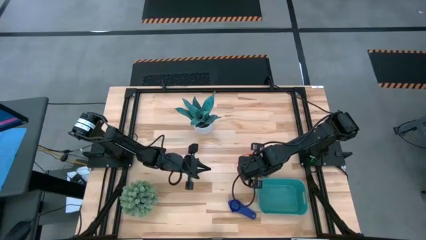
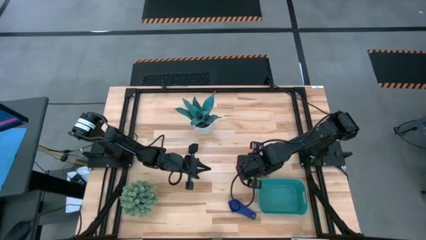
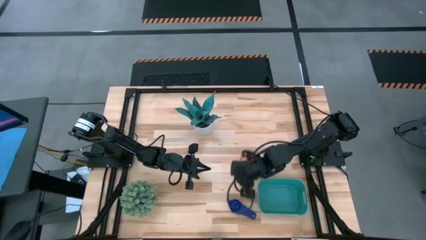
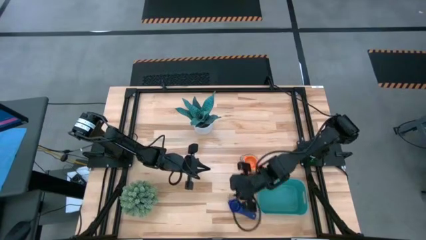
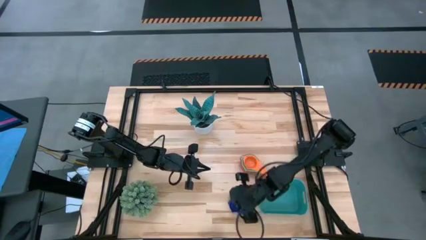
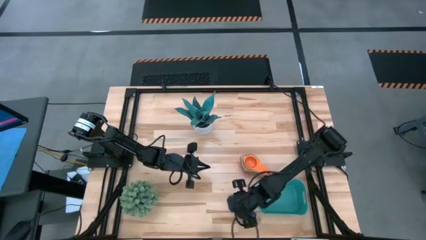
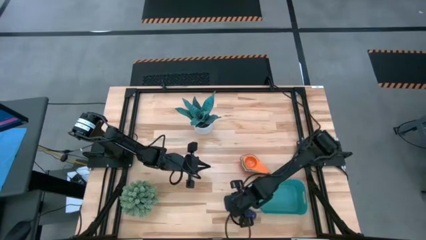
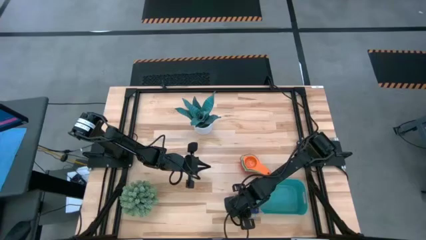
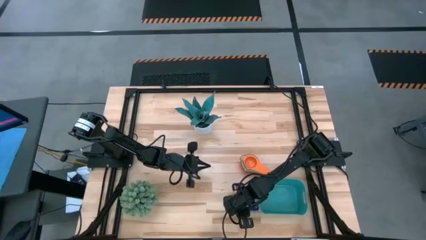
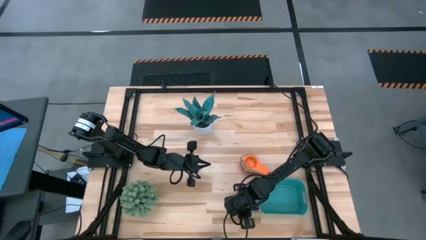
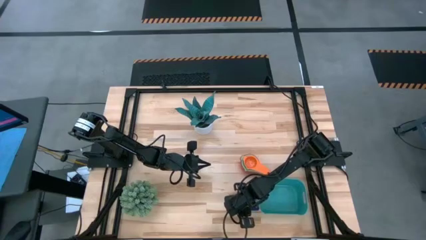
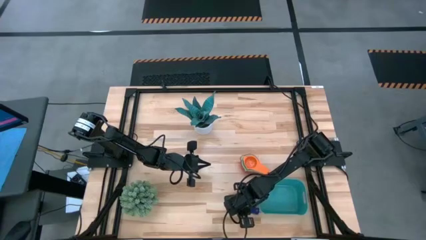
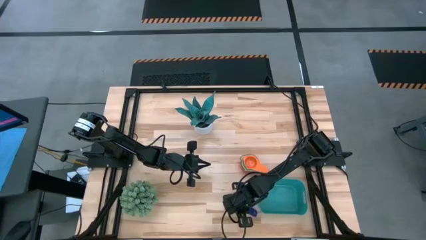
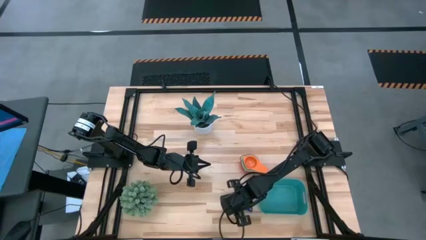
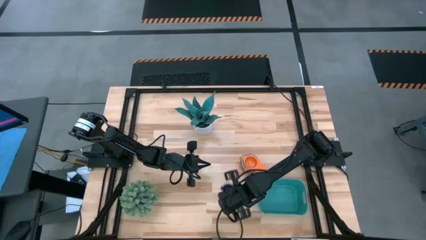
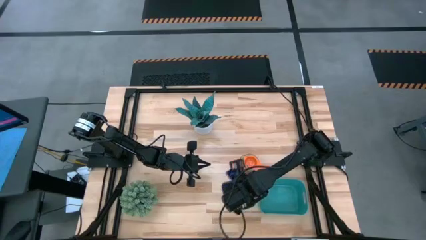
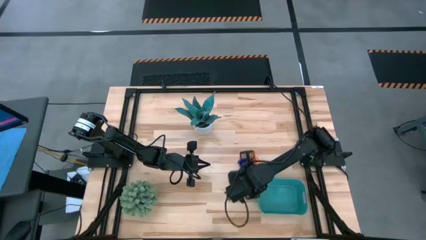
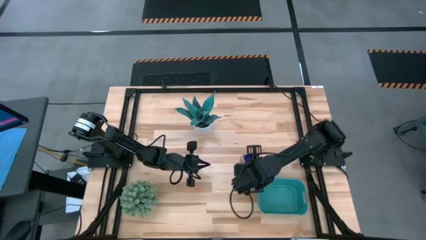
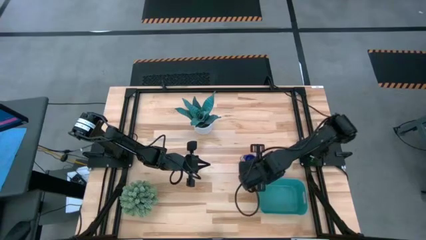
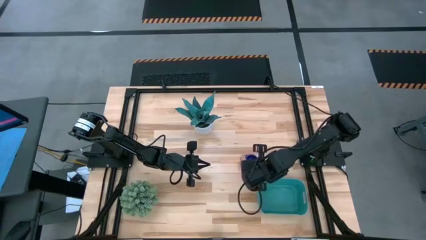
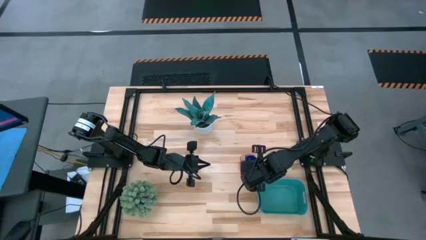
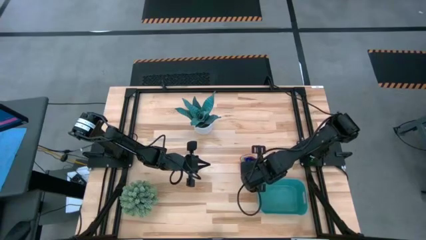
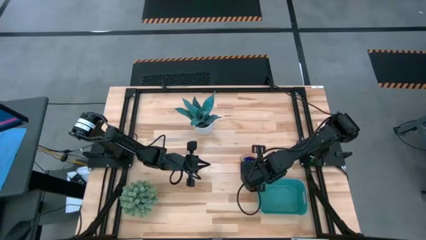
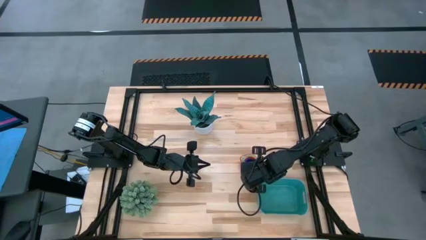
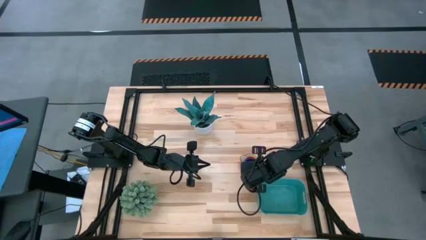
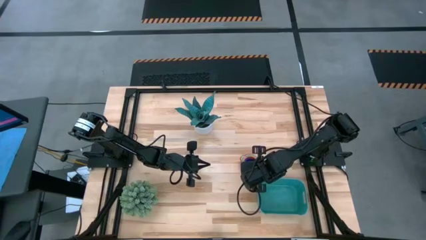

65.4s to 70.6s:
Task: Nest measuring cups in basket
Stack the dark blue measuring cup on top of the orange measuring cup

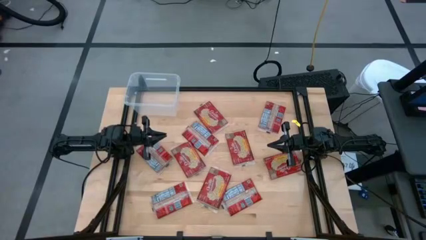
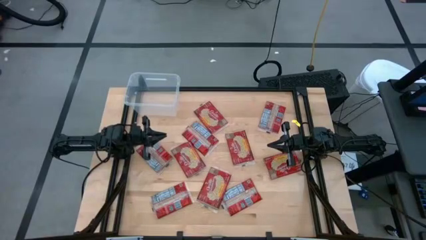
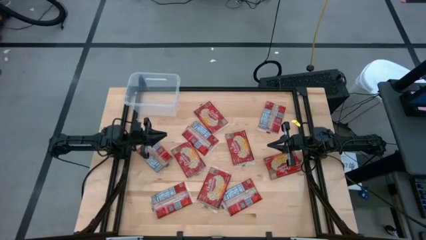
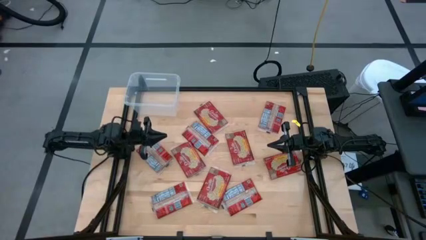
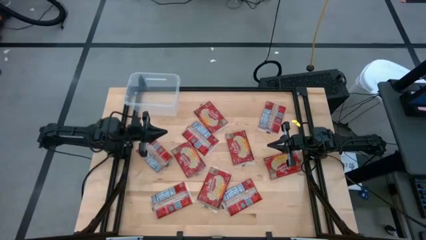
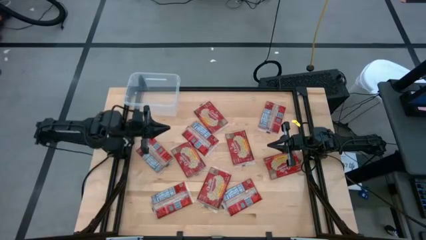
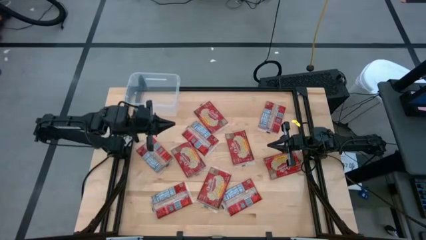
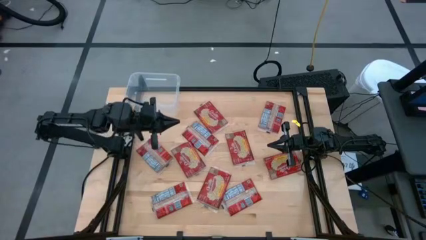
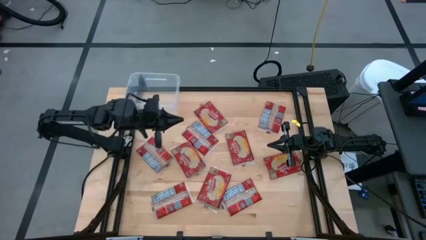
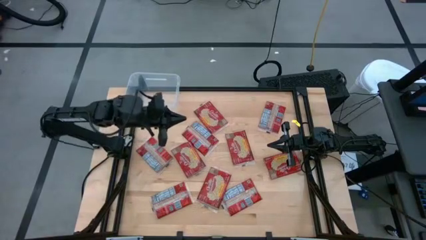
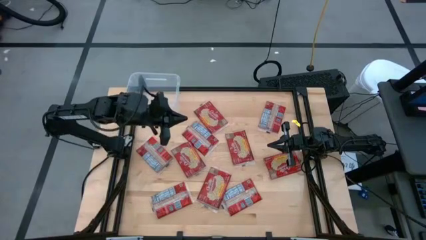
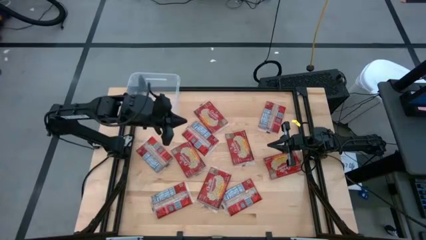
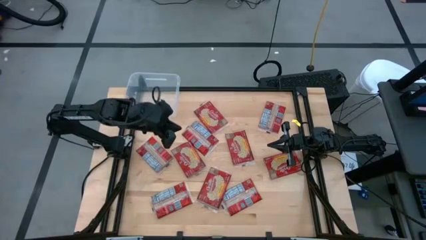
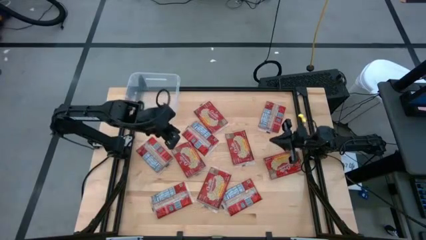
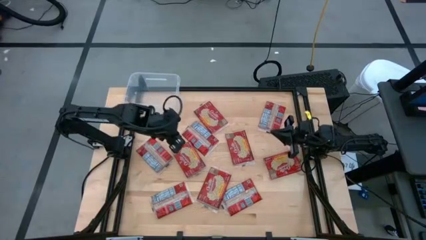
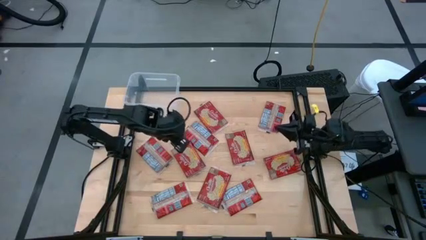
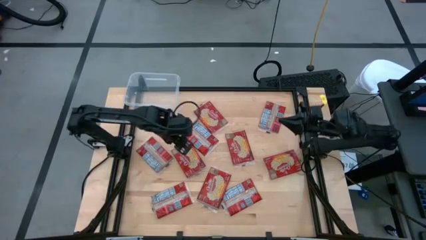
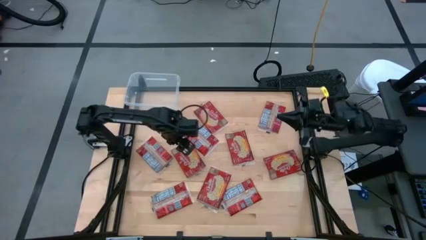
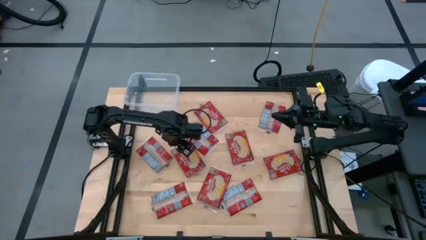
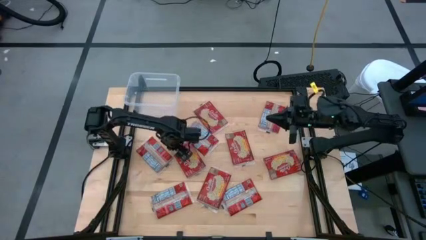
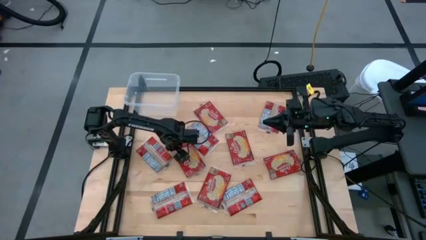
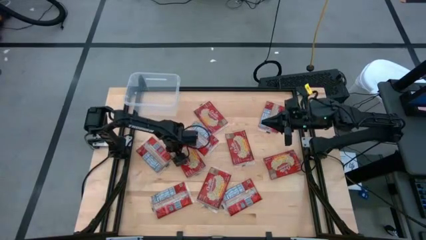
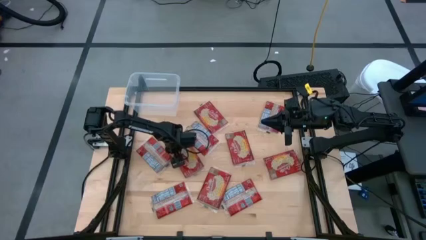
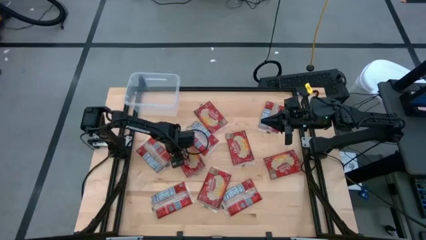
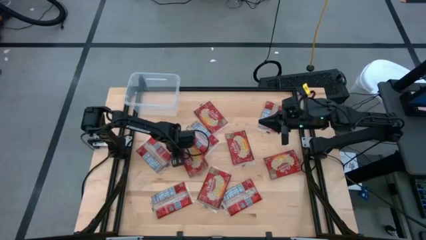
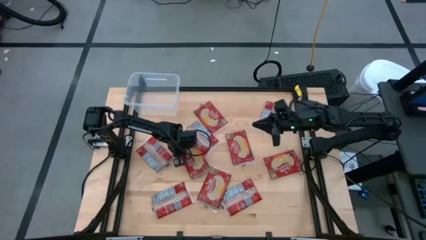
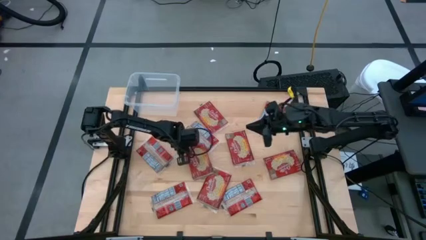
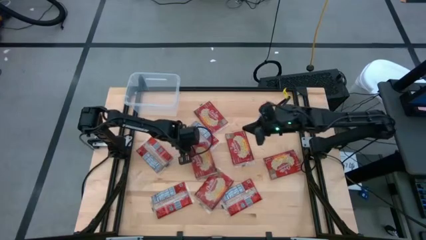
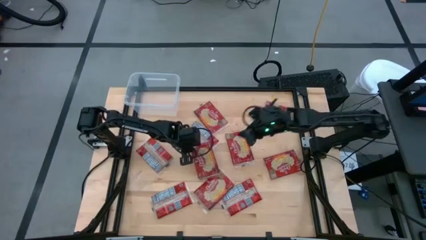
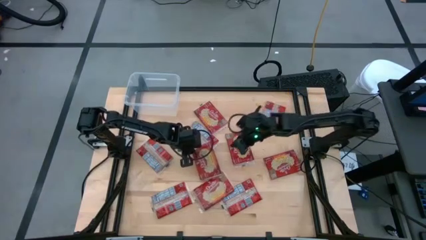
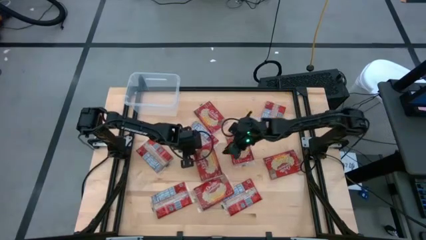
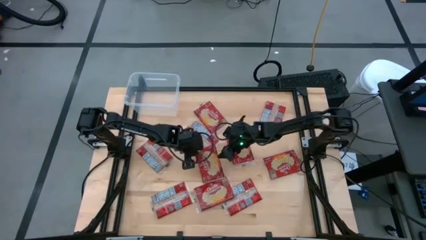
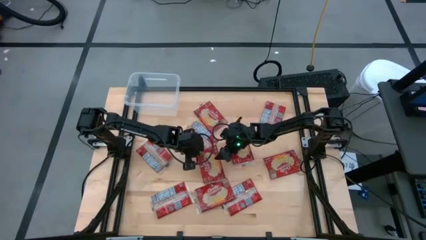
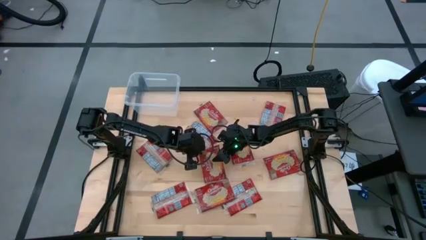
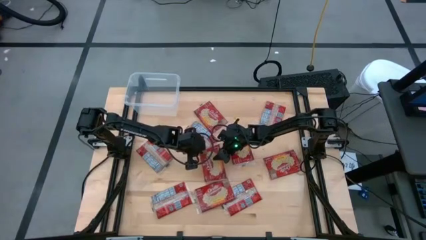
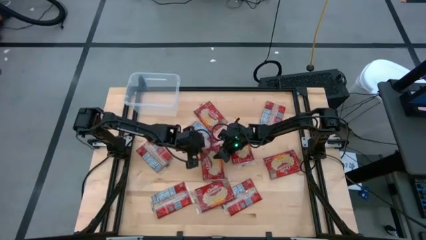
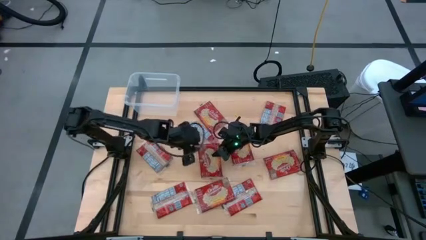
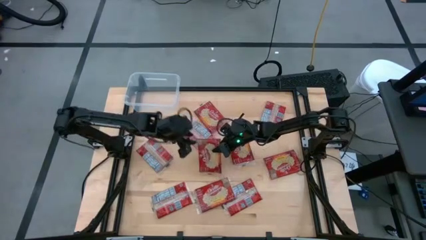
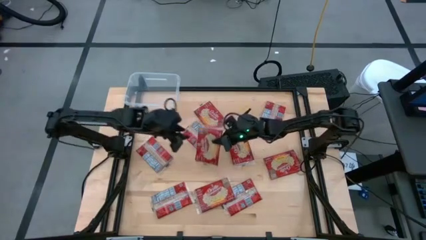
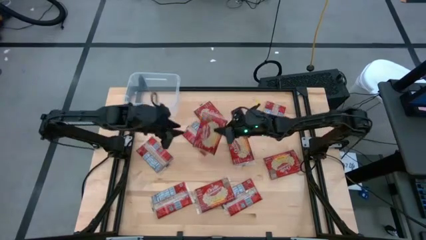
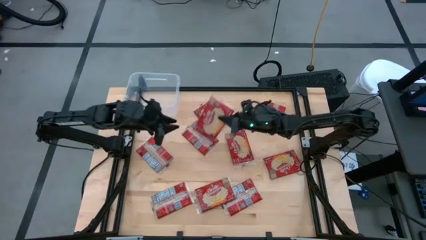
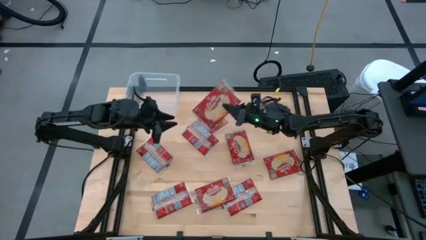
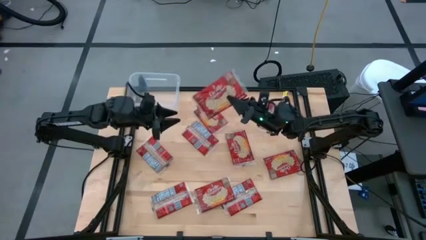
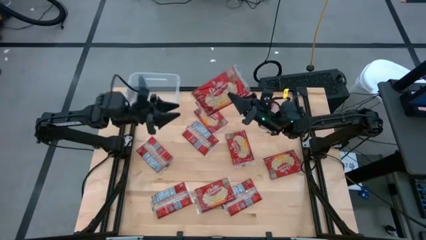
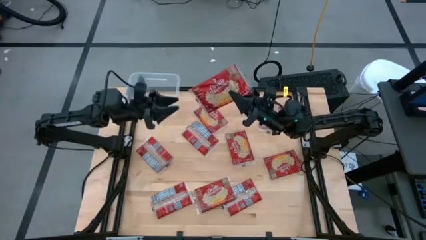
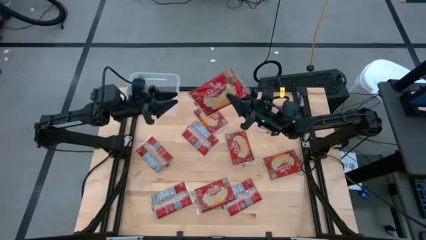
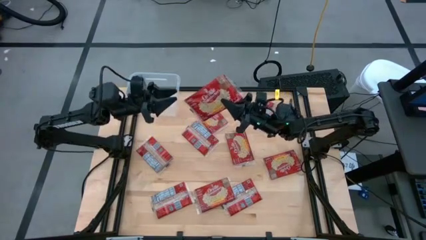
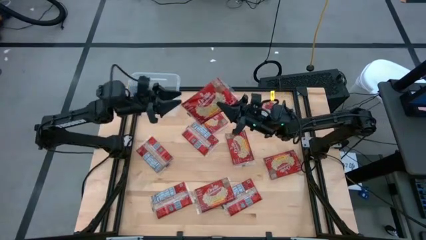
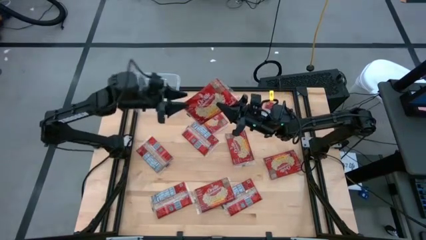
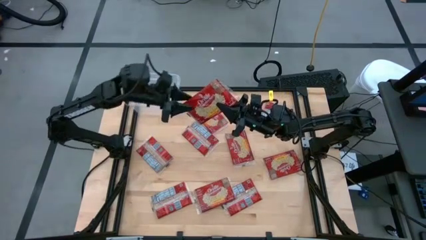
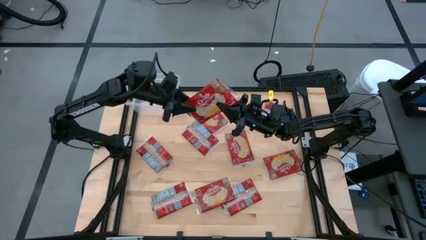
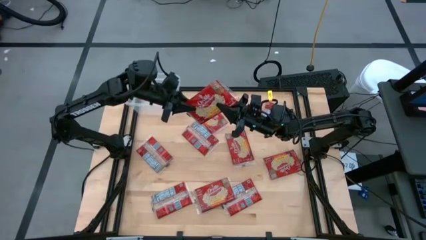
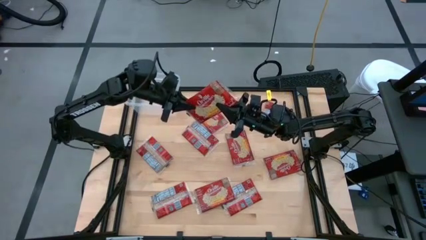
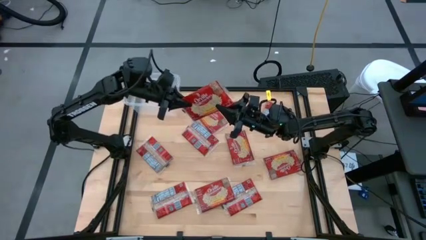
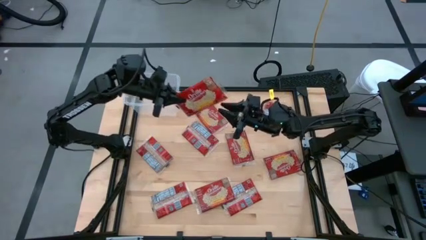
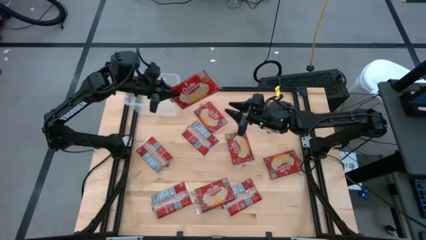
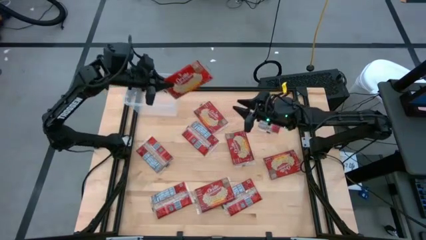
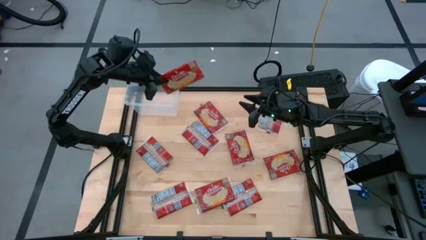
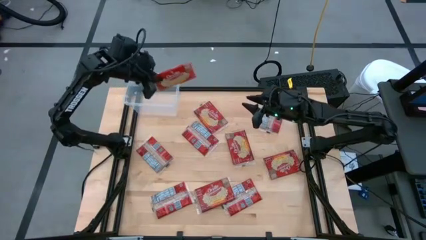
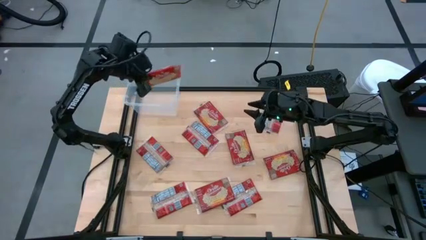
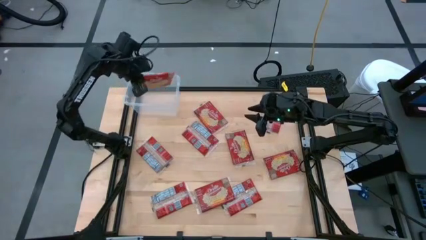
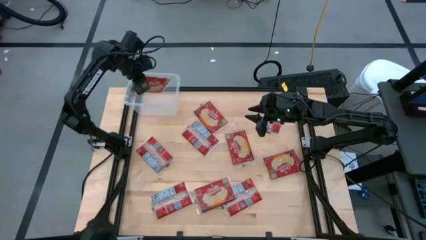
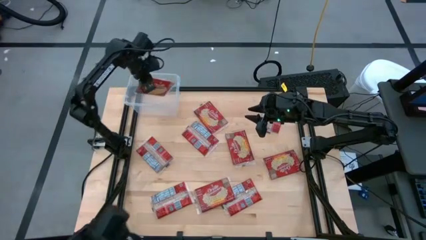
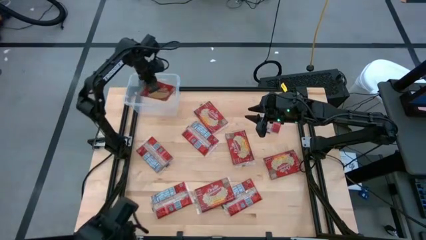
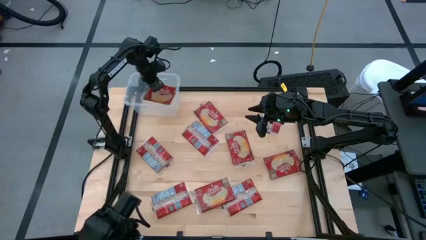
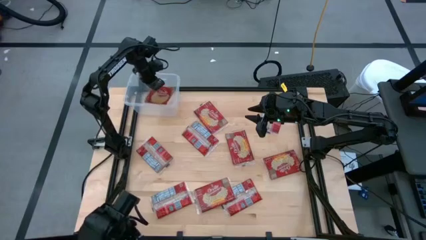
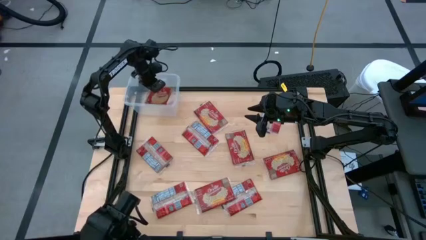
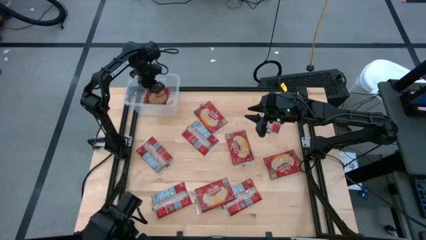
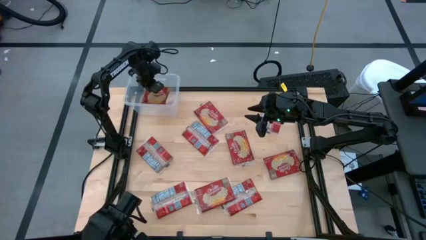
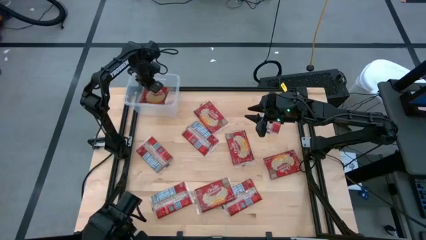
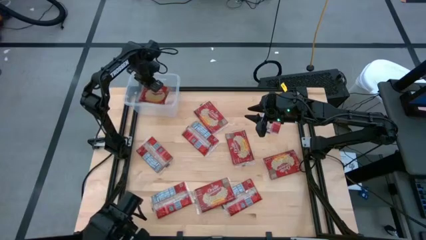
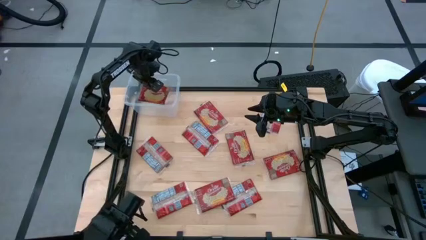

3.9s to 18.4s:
Task: Sort popcorn bags into baskets
Put the popcorn pack into the transparent bin
